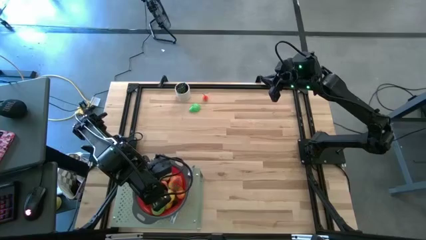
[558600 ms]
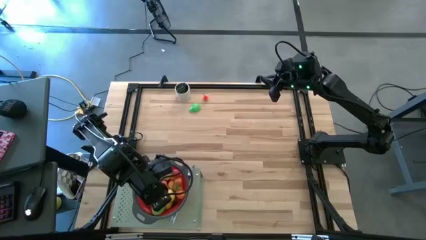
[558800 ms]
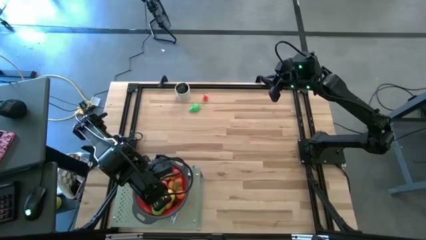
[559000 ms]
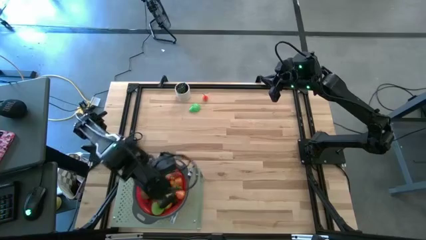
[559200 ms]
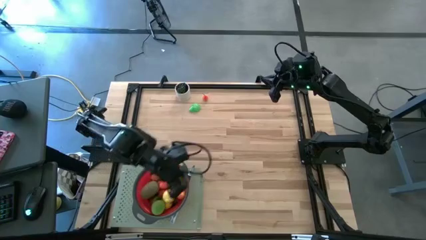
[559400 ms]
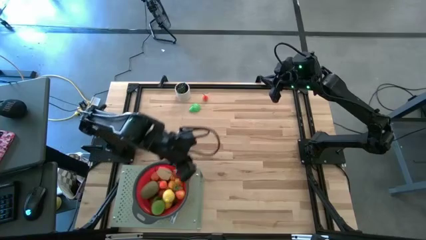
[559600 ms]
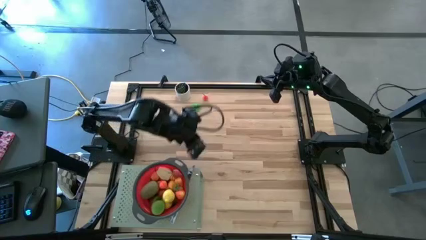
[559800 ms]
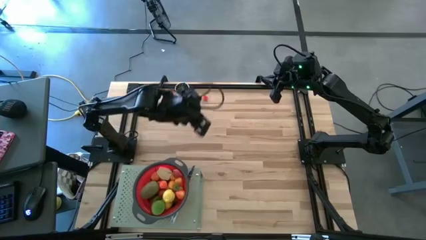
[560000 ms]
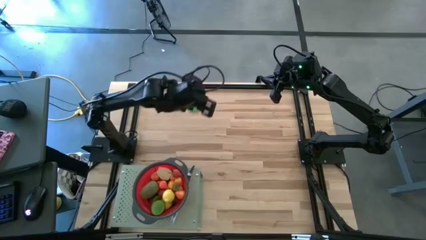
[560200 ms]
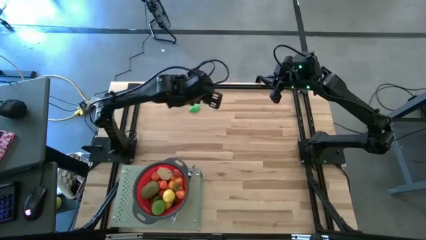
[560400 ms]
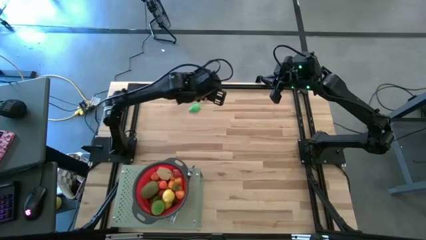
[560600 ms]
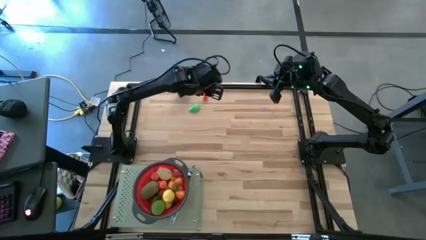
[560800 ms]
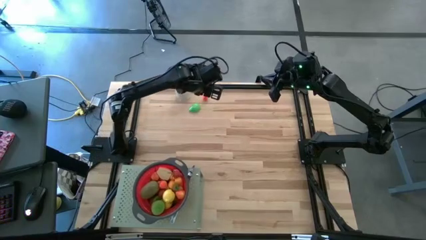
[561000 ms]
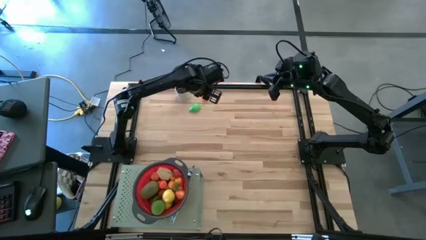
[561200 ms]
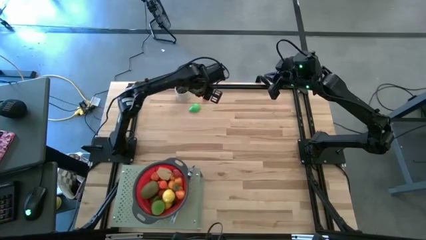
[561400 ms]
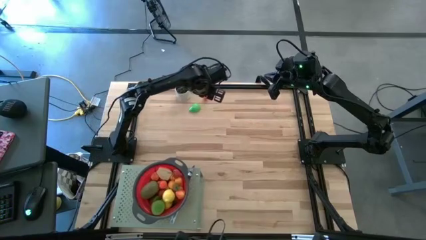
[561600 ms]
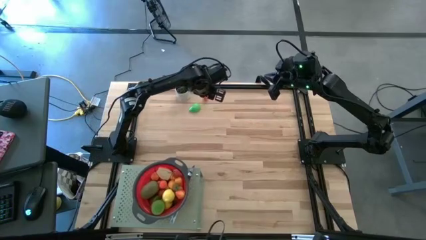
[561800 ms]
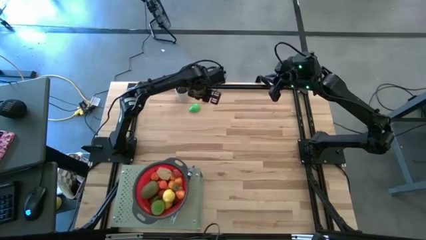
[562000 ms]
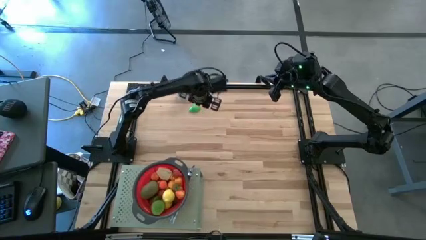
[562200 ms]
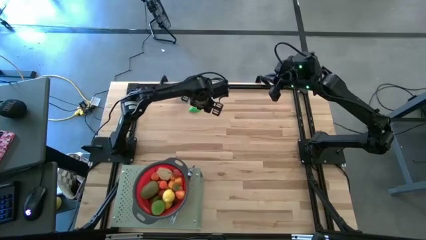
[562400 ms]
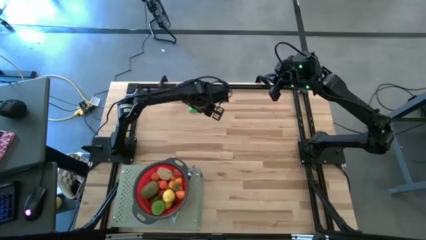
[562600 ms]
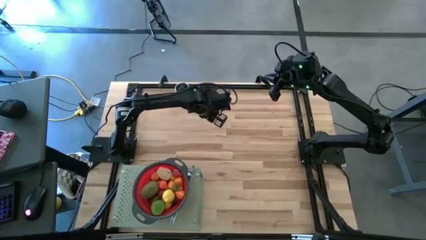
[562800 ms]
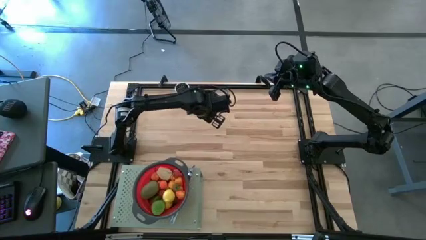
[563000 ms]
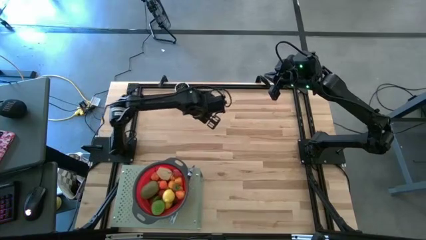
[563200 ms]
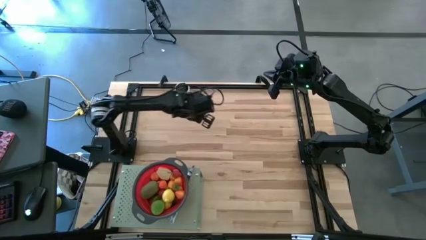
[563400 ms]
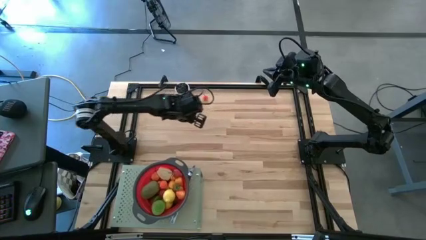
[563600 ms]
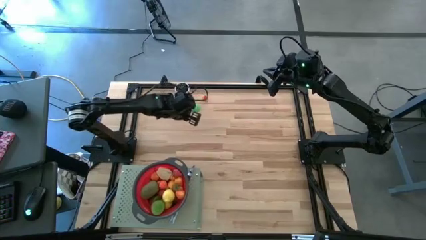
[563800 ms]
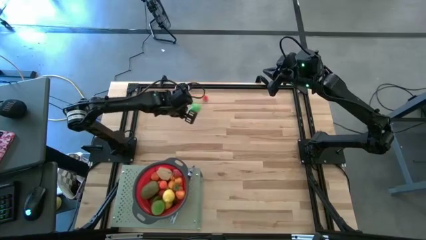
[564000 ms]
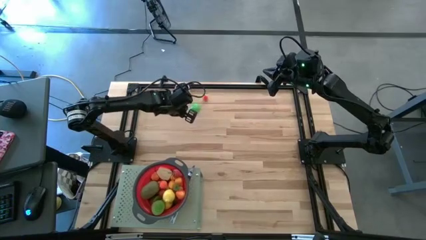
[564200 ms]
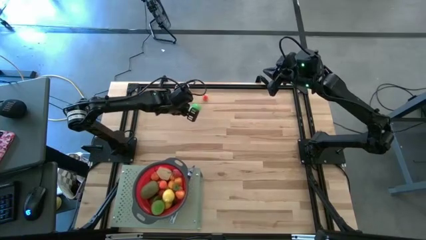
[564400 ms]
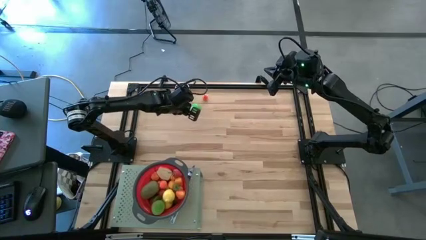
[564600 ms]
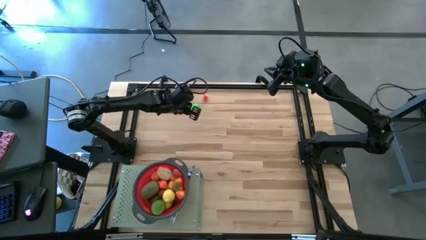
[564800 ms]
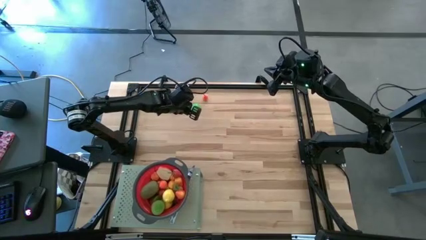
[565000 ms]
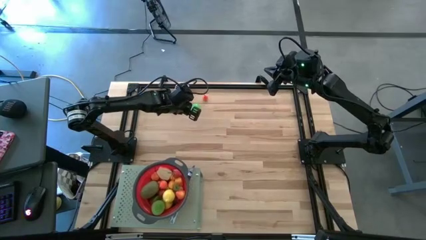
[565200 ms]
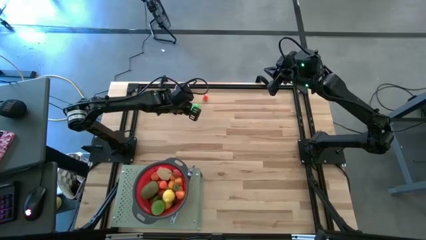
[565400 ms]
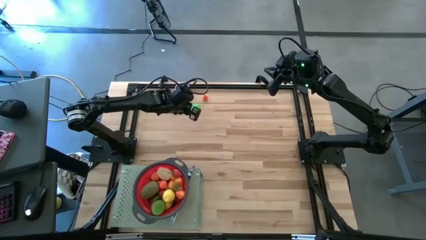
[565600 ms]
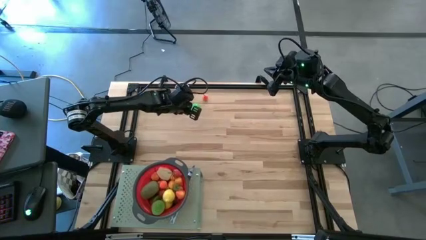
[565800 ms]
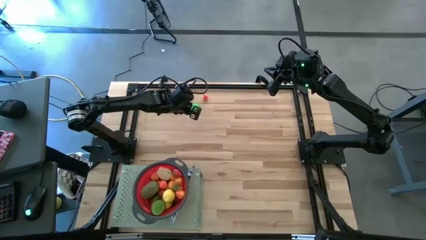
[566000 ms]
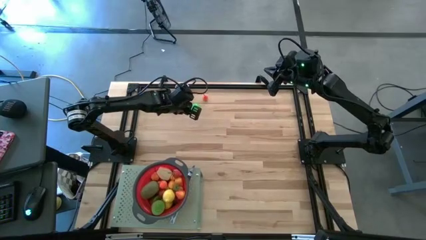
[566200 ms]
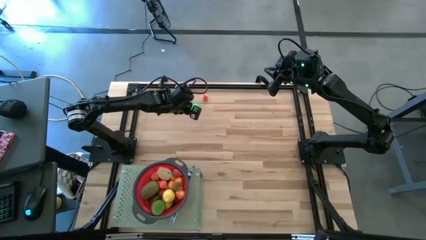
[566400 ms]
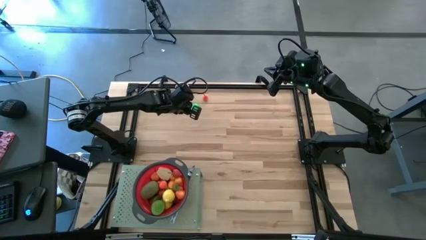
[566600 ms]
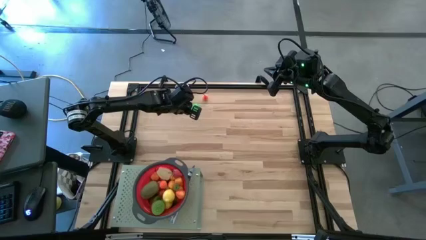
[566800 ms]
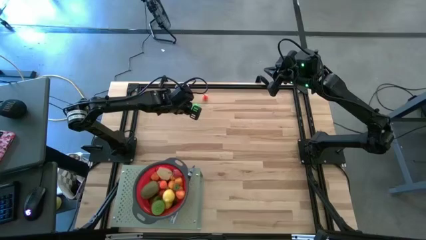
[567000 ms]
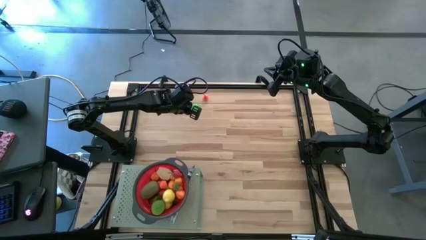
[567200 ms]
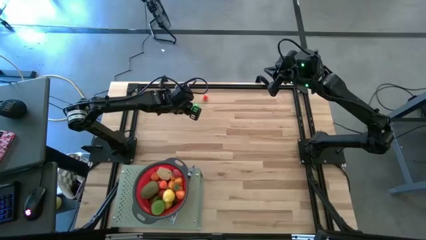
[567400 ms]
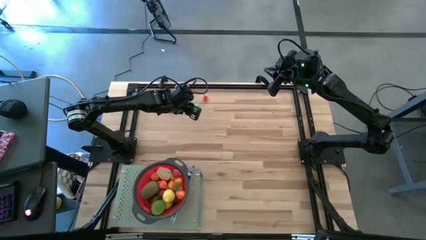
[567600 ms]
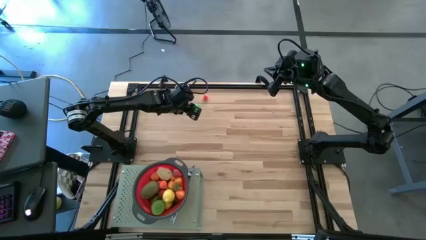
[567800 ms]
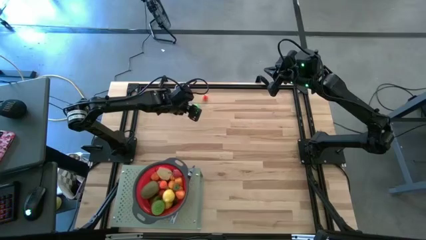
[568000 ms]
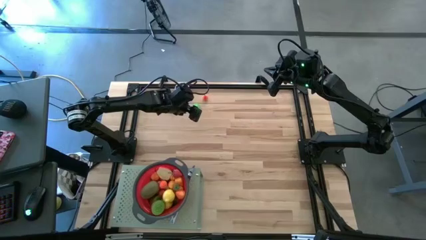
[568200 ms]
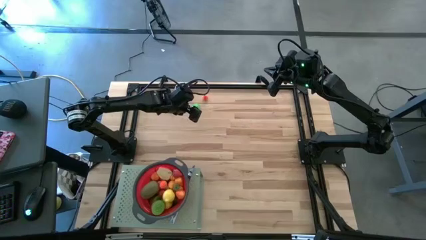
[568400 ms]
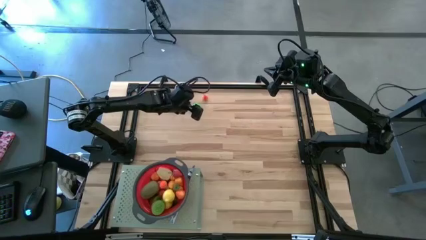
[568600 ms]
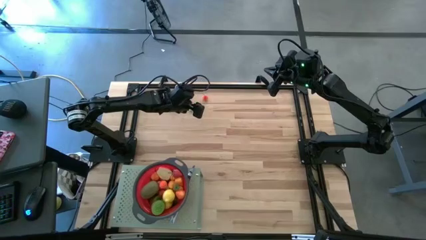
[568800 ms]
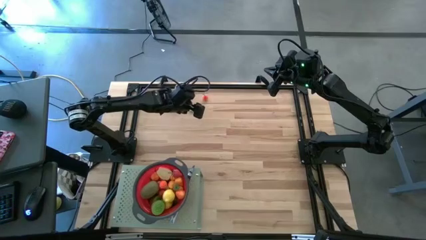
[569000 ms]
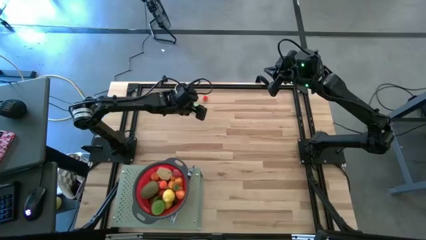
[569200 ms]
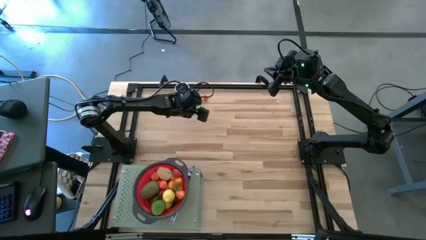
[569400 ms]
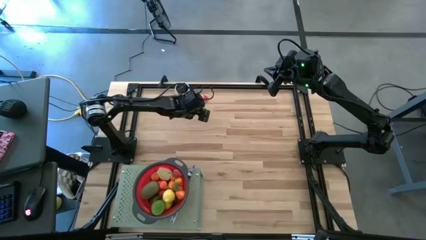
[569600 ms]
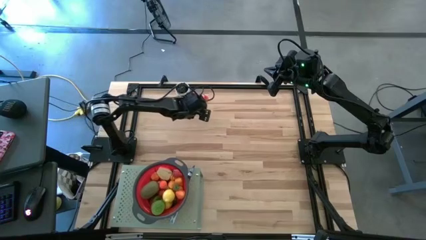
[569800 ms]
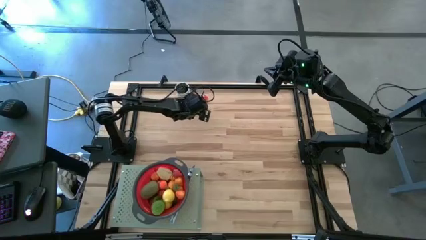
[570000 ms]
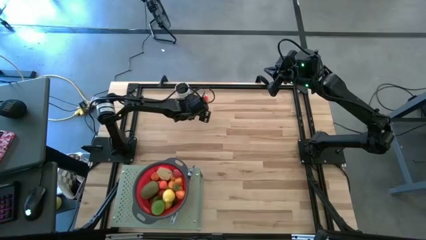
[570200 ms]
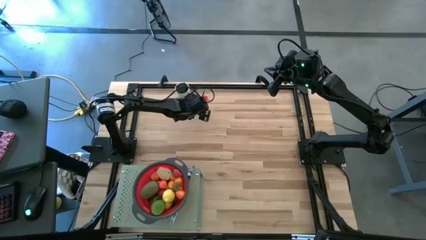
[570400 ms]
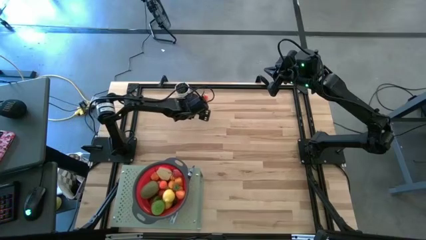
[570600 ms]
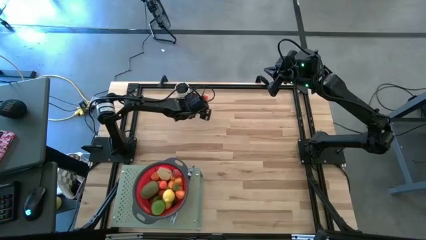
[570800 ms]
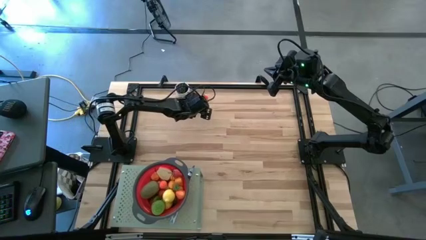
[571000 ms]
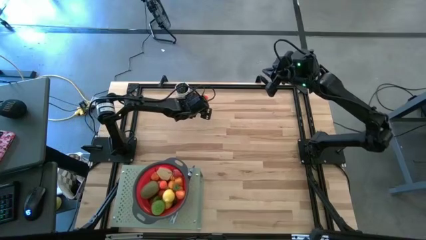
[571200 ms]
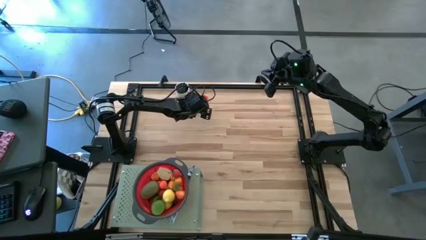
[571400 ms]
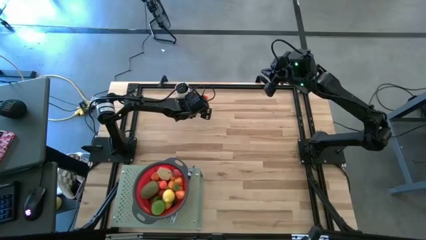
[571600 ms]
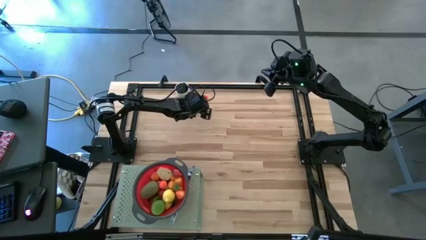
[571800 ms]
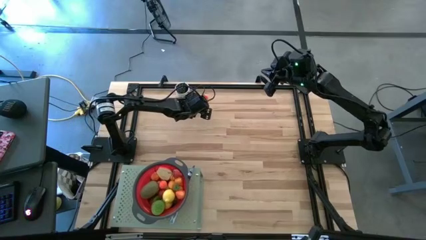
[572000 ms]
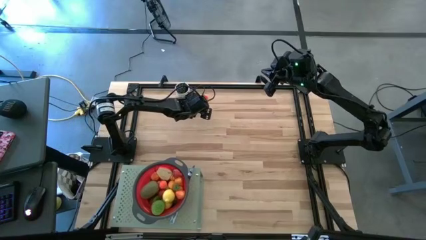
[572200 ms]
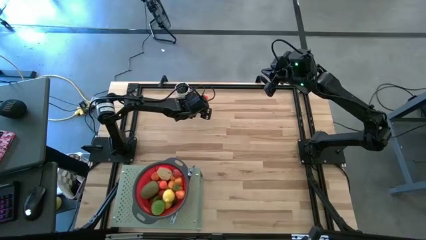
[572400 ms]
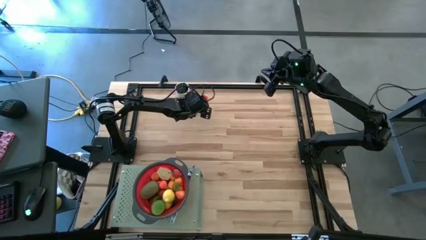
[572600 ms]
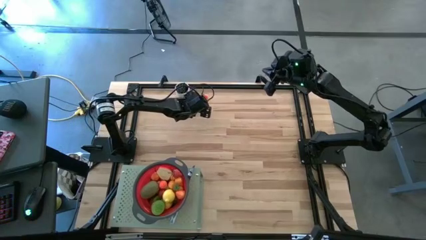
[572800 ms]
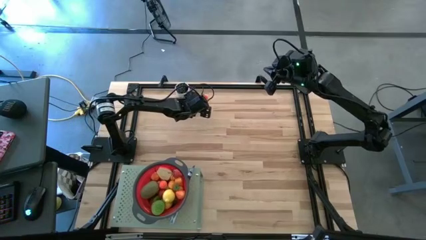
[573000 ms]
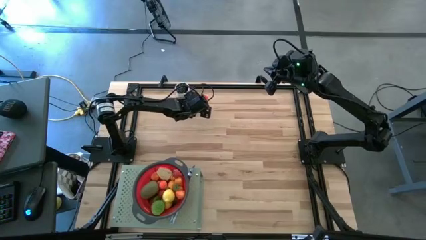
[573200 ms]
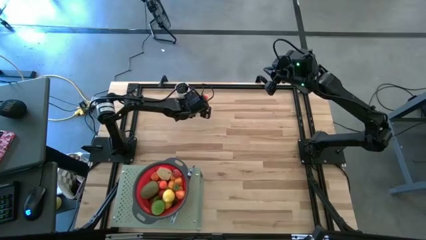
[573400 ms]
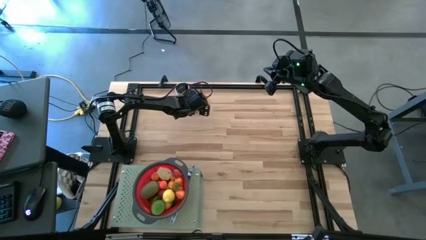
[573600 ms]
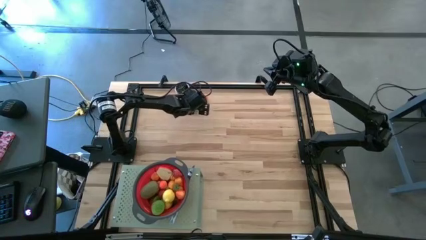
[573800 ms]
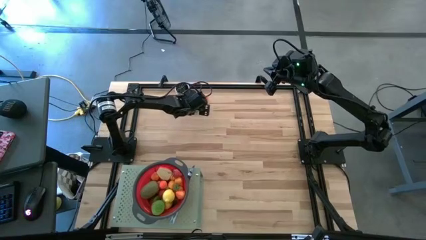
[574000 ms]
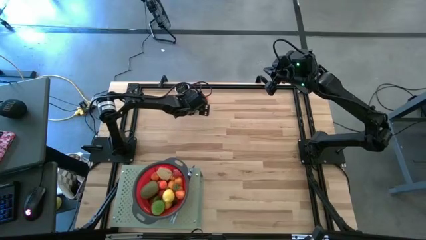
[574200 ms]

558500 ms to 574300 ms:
Task: Pick & Place Fruit
Put the half avocado into the red strainer bowl on the shelf
